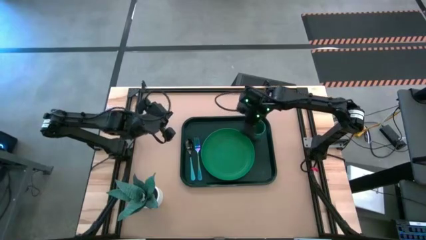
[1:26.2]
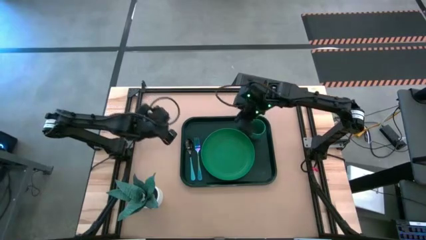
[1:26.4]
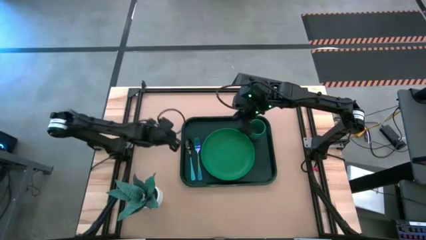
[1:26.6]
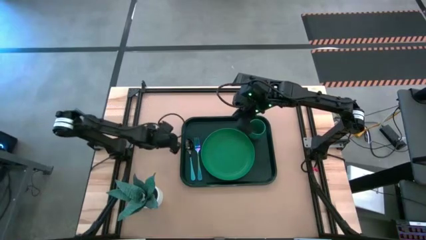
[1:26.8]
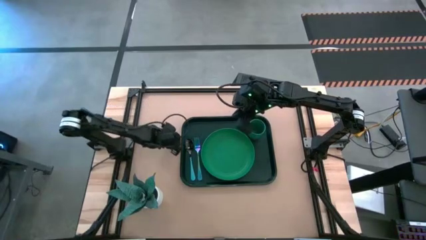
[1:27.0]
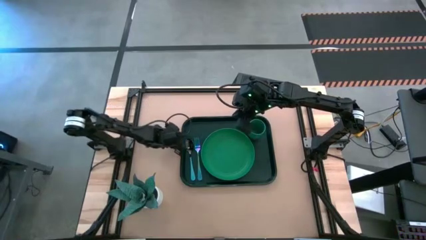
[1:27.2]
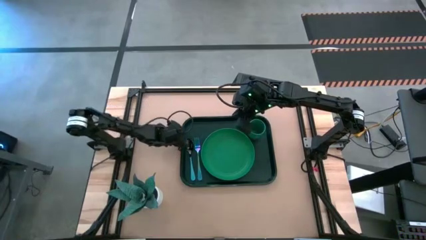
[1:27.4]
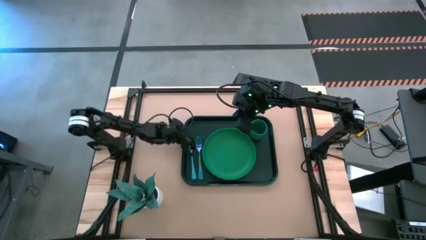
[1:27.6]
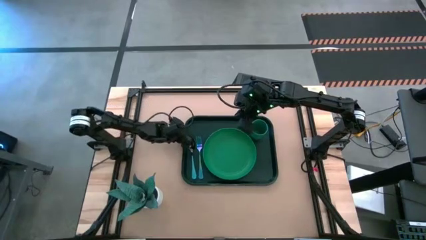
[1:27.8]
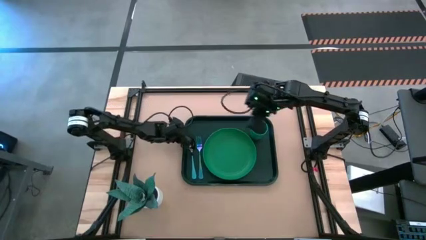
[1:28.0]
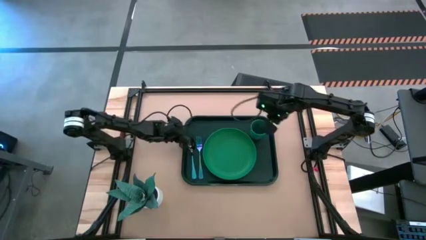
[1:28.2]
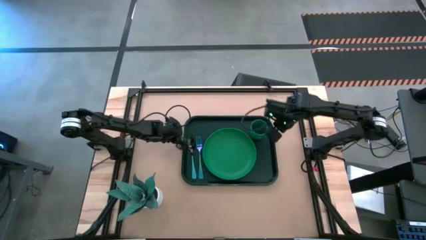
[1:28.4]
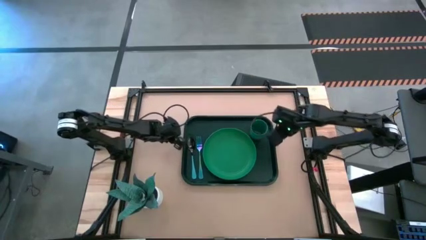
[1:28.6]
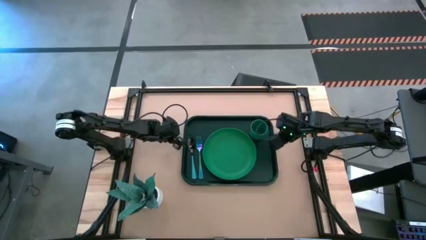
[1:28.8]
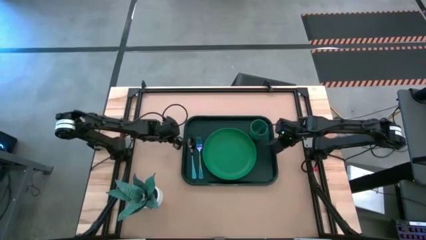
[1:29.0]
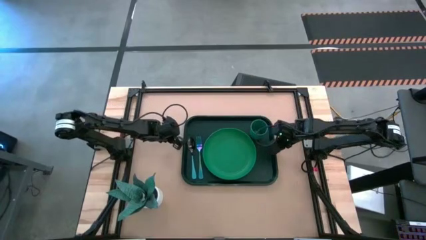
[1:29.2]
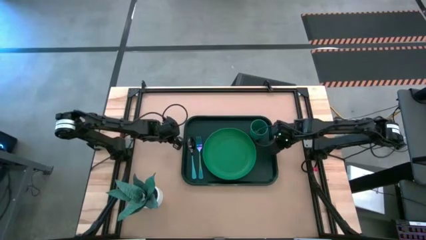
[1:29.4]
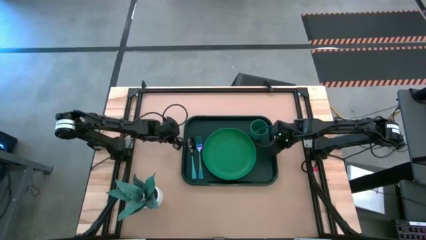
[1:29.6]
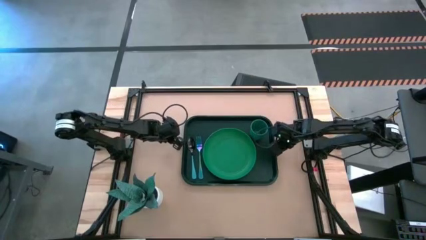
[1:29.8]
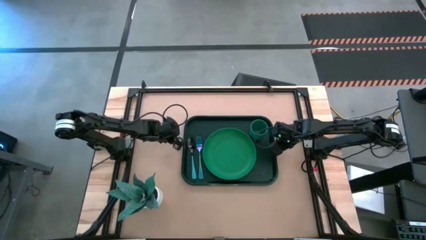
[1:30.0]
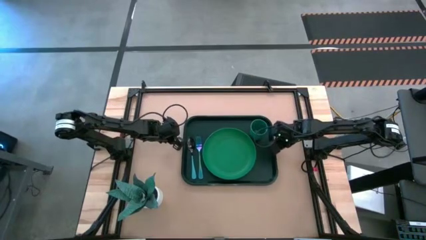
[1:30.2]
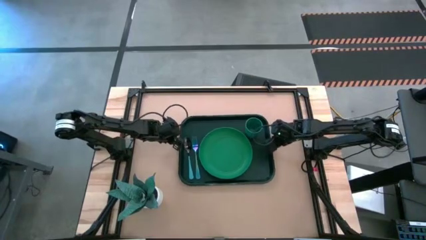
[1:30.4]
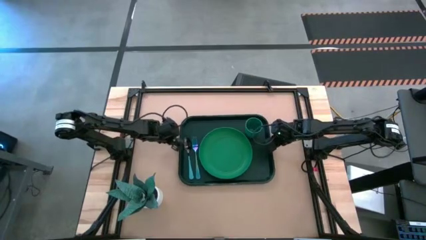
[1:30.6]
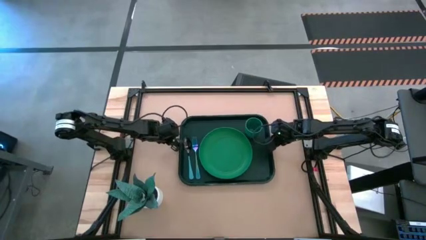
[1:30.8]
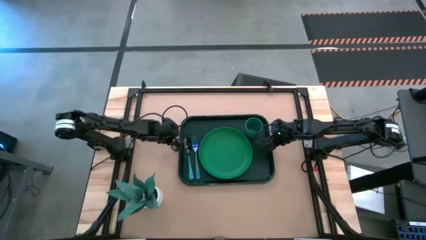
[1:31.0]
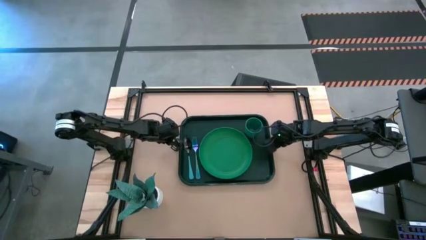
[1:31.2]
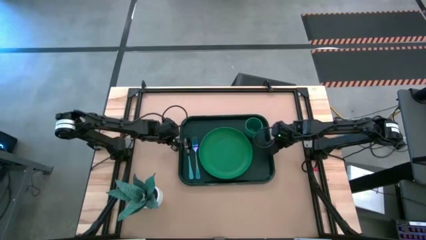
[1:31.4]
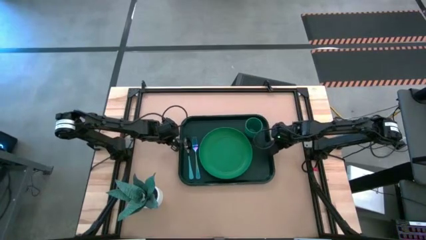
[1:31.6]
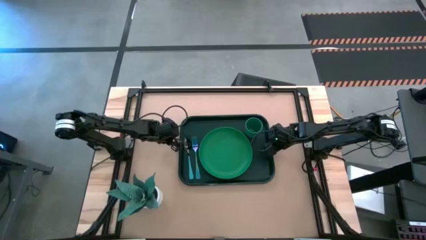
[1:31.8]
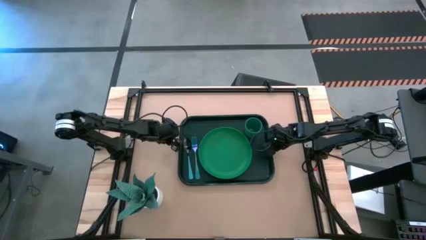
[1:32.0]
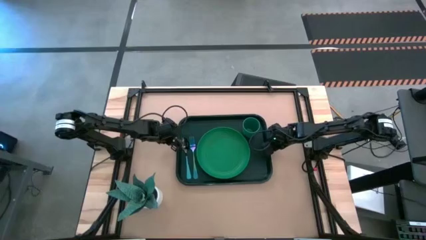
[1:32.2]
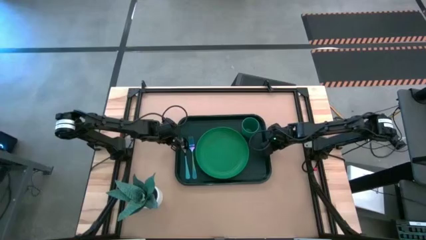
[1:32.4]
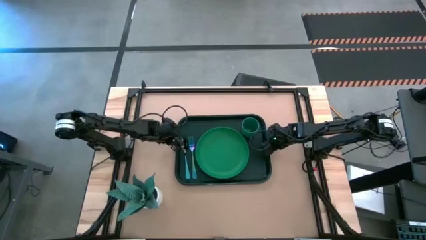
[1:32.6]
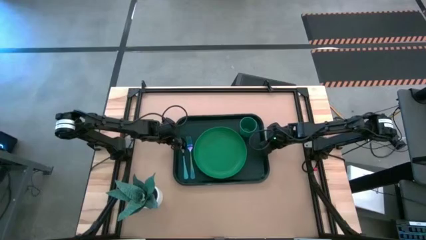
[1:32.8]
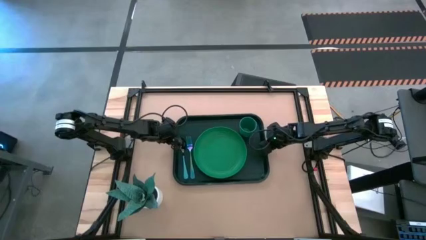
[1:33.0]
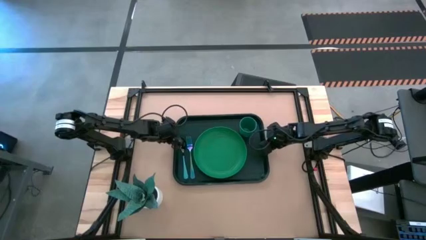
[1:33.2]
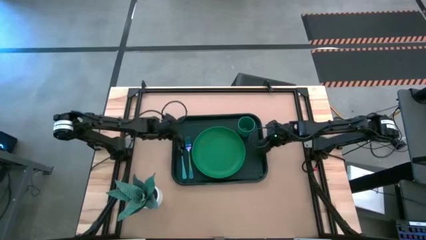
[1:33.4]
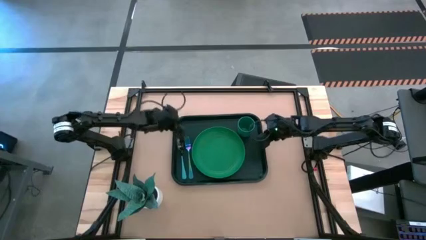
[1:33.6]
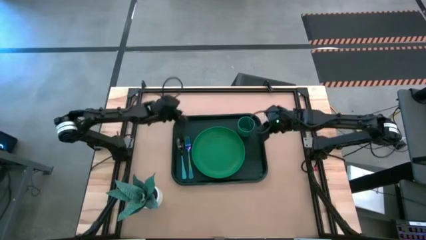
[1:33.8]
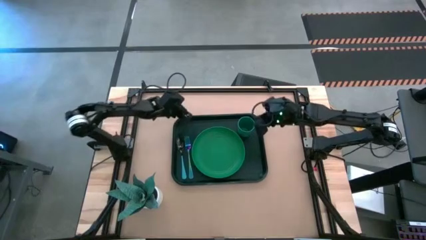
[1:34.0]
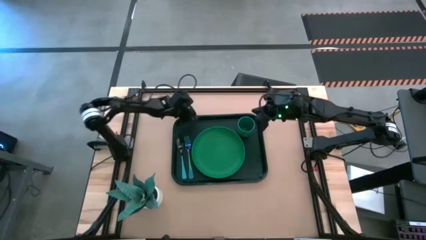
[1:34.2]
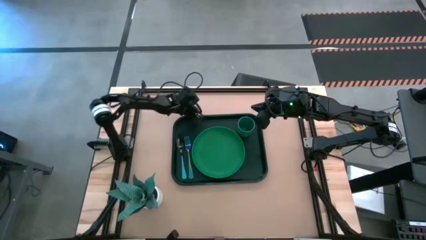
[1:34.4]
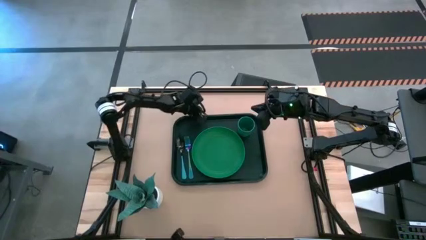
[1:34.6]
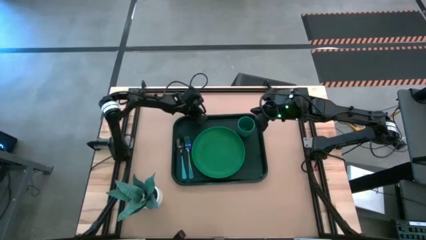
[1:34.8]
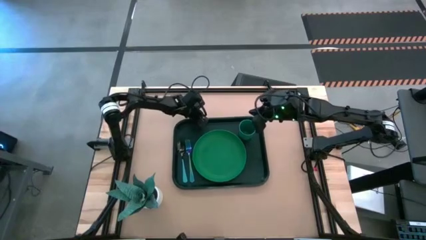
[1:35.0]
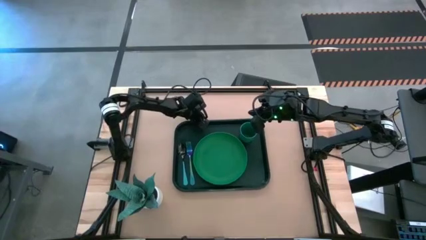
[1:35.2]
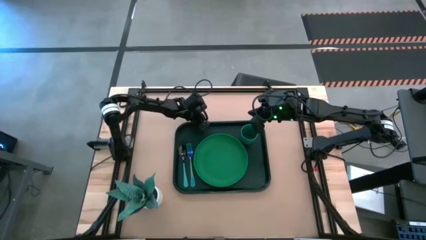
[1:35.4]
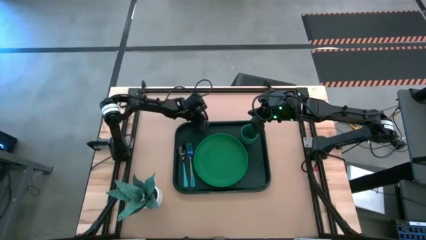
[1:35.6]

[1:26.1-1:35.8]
Task: Pick and place plate/cup/fork/spoon on tray
Adjust the dark green tray

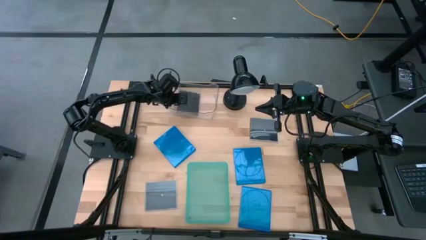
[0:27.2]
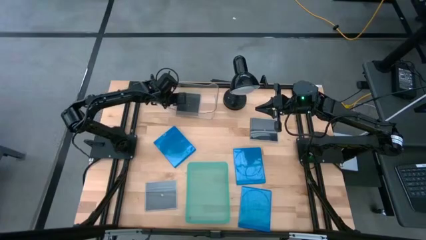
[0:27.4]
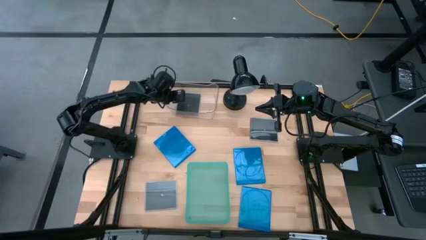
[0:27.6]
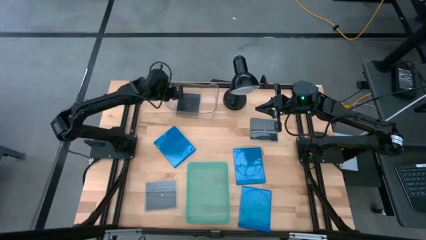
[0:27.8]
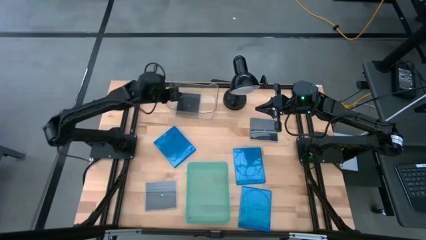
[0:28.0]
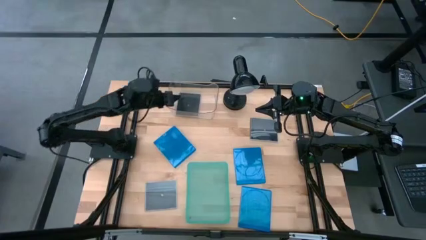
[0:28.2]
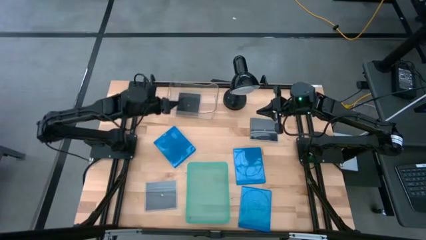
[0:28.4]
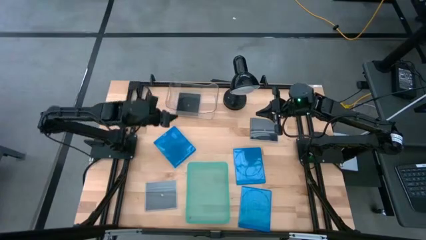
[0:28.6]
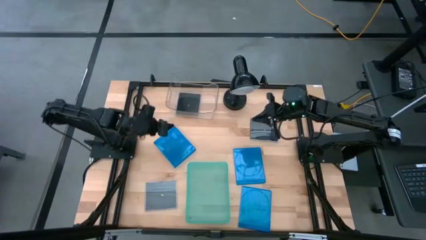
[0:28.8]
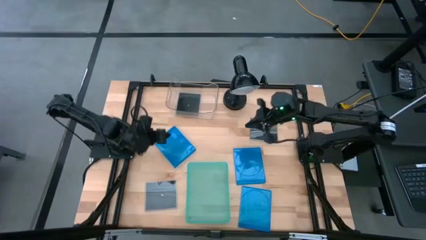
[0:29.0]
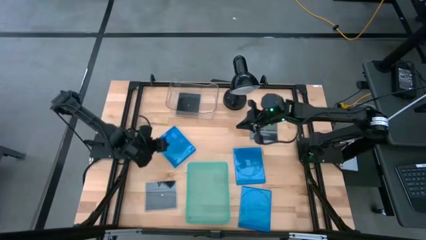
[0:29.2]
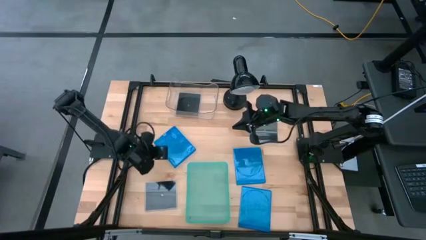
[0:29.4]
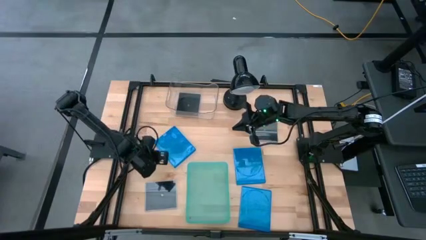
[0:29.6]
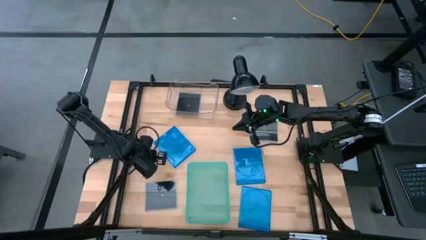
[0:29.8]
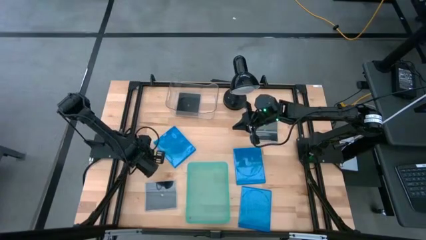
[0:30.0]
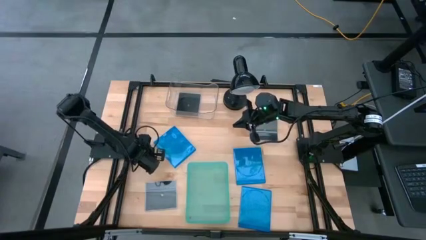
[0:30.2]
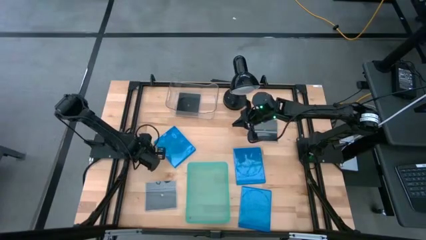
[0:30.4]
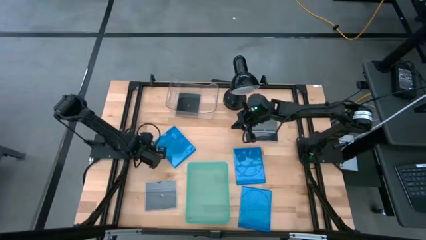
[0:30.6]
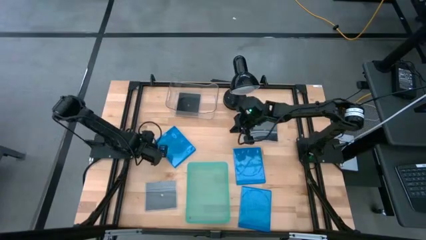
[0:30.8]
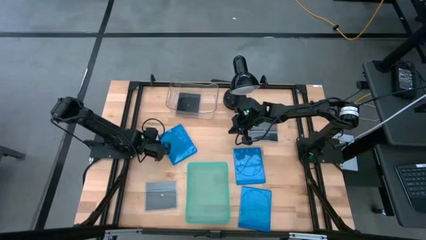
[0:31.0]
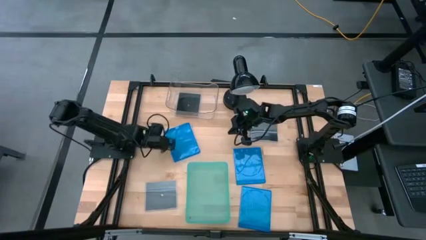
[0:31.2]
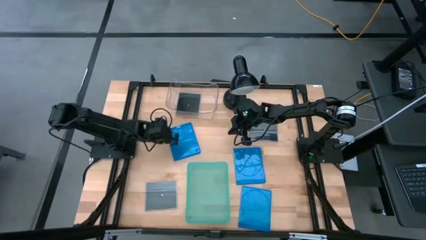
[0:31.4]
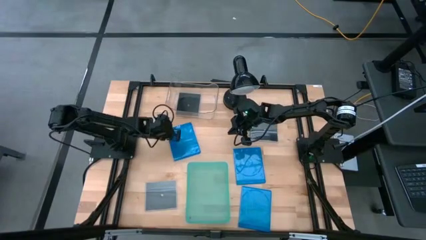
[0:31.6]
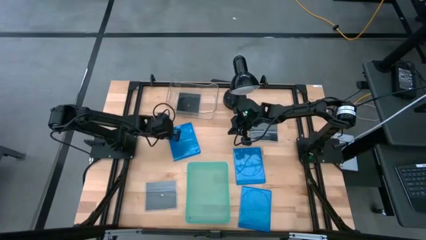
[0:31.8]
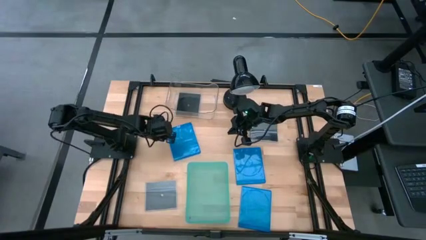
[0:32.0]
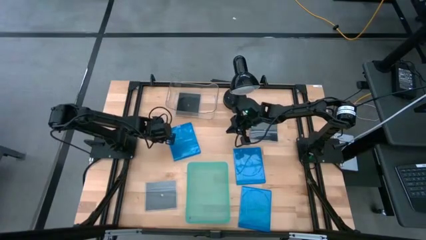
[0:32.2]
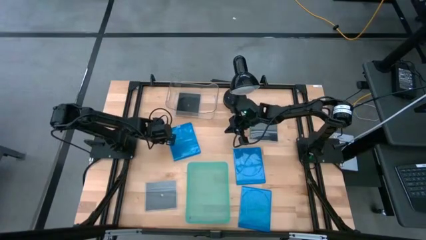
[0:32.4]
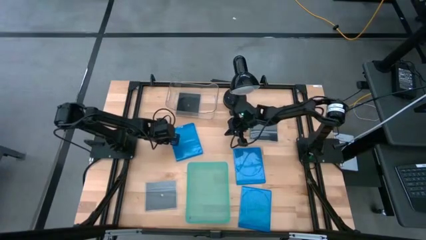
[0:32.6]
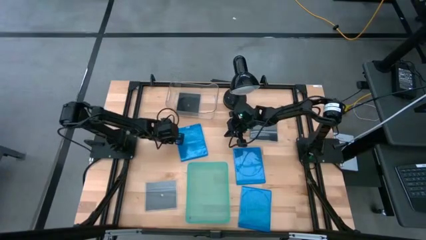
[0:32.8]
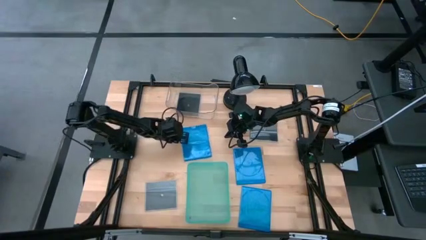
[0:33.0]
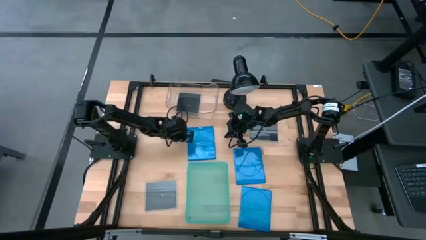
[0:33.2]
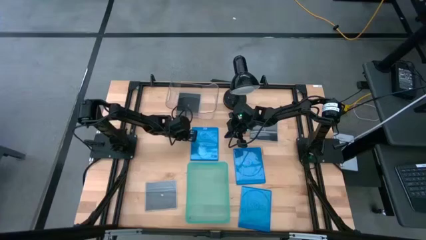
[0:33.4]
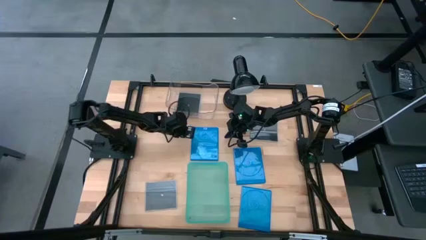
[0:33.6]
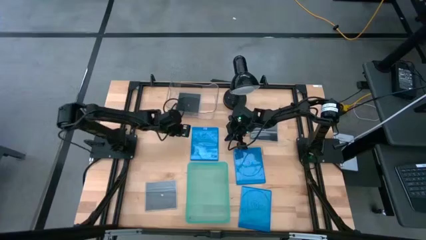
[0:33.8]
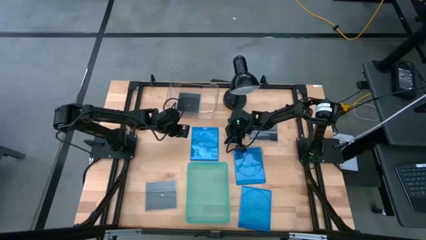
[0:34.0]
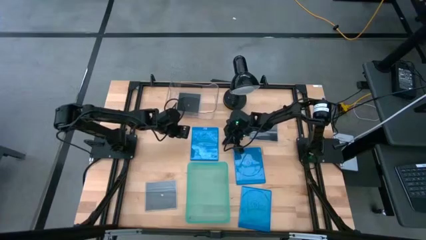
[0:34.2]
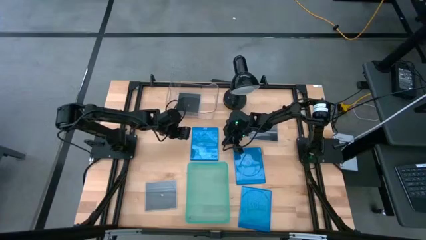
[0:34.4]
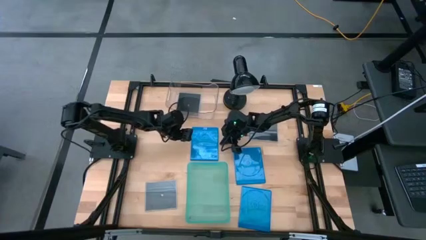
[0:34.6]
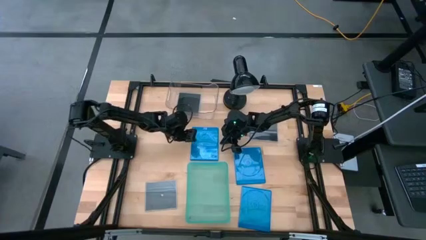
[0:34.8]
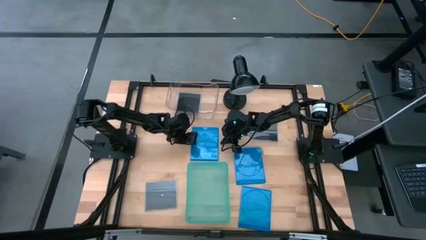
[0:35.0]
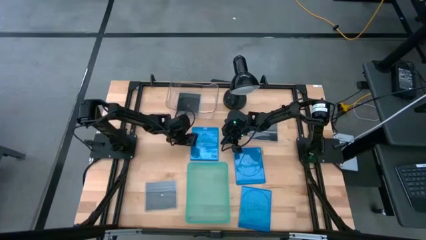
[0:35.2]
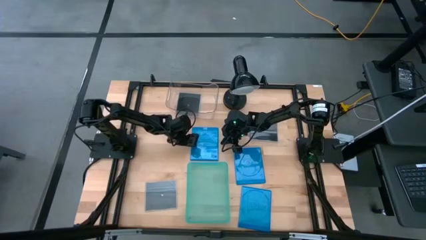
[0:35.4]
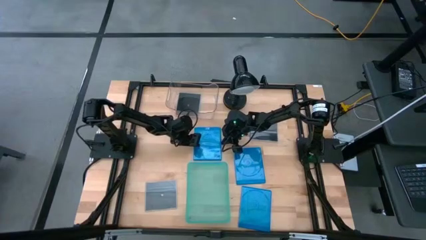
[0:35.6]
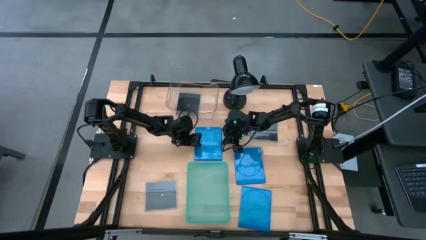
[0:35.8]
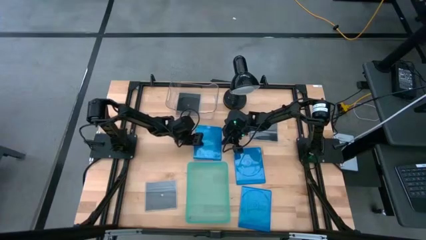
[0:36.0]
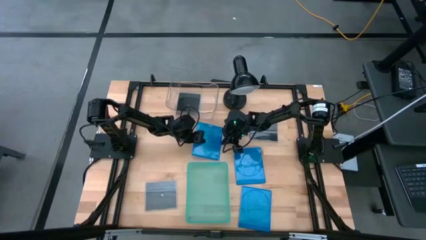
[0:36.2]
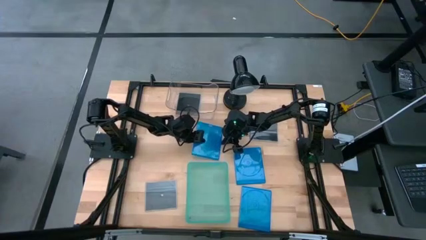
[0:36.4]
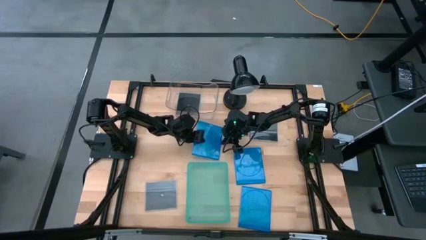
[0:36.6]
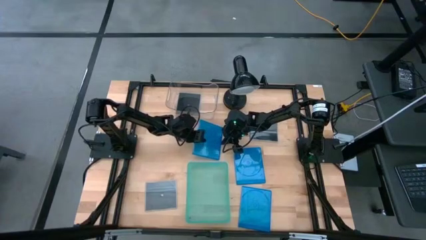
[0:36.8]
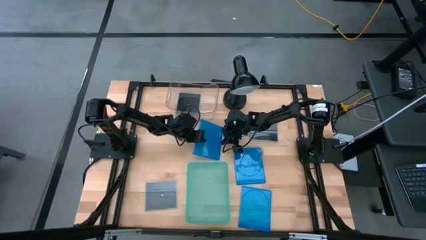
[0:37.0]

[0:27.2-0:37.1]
Task: Pick & place jewel cases by type
Put the middle left blue CD case into the green bin
